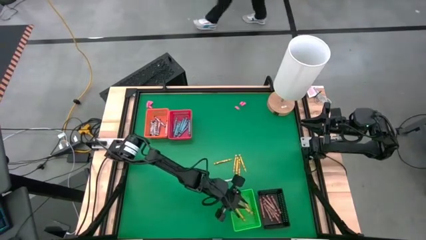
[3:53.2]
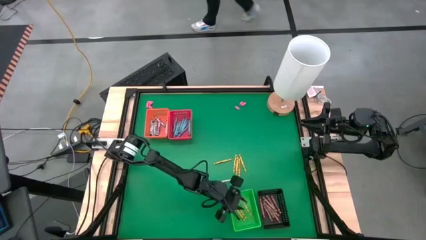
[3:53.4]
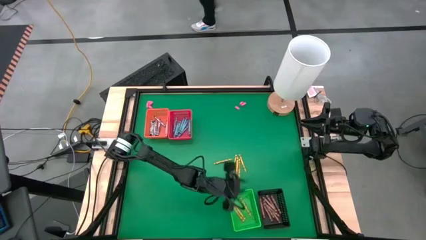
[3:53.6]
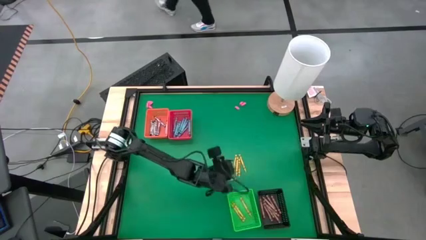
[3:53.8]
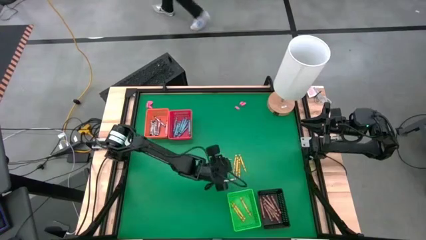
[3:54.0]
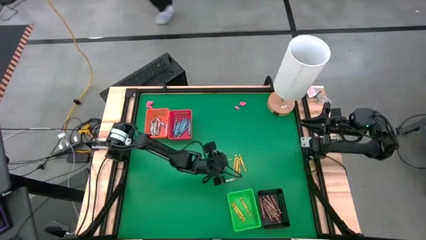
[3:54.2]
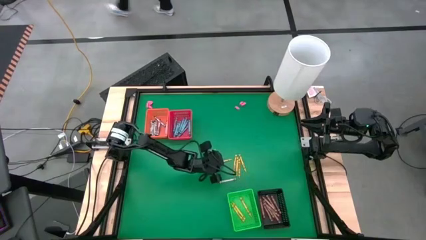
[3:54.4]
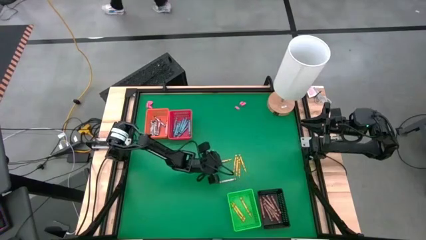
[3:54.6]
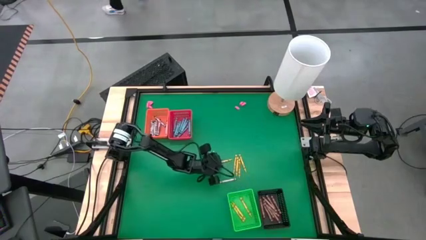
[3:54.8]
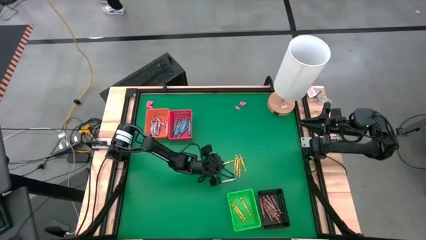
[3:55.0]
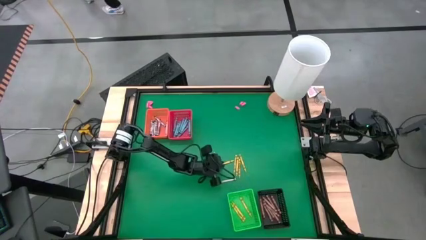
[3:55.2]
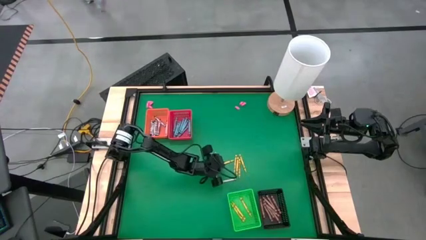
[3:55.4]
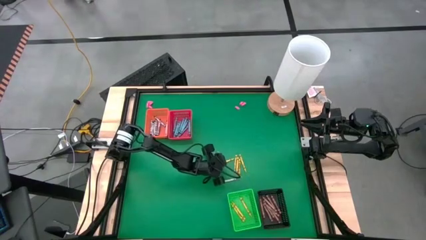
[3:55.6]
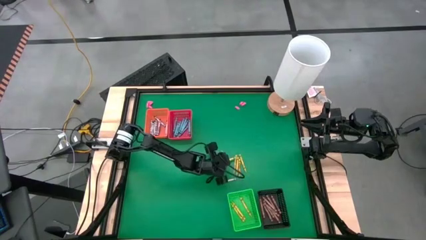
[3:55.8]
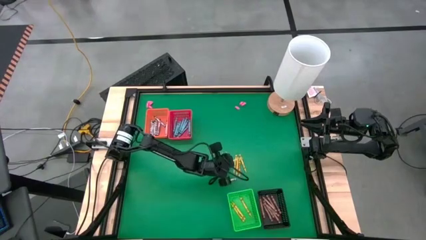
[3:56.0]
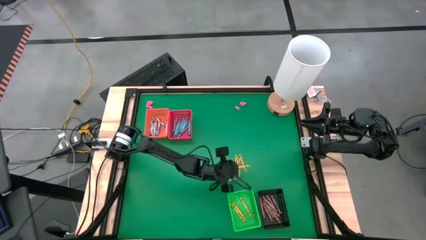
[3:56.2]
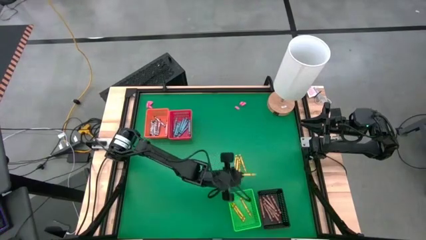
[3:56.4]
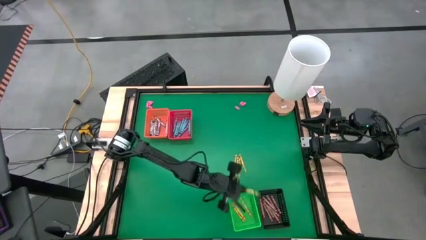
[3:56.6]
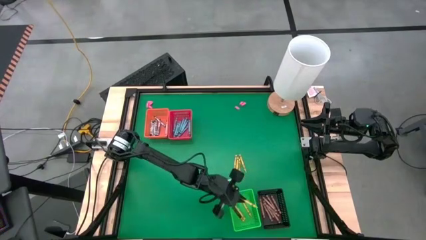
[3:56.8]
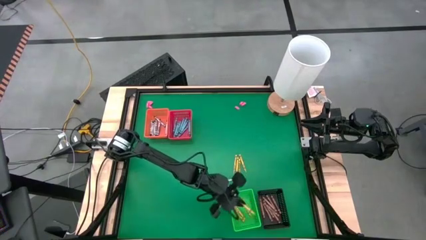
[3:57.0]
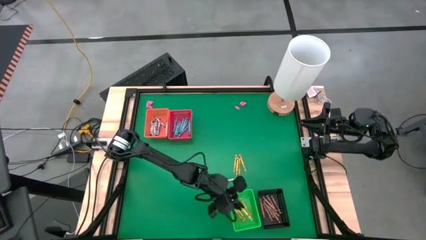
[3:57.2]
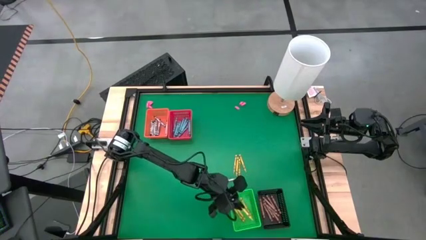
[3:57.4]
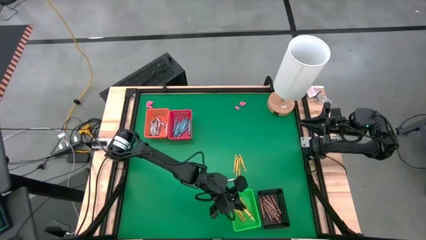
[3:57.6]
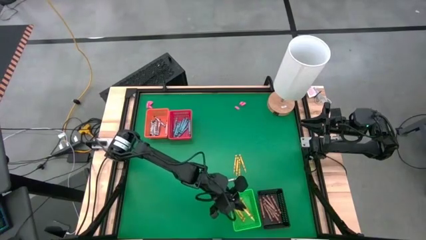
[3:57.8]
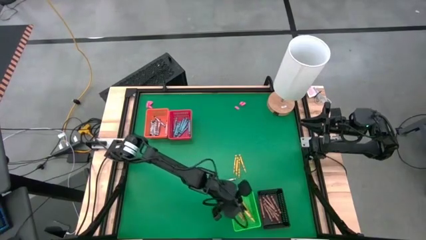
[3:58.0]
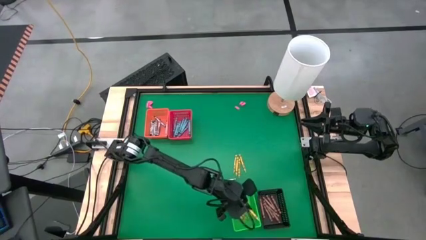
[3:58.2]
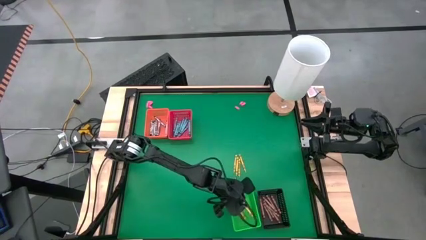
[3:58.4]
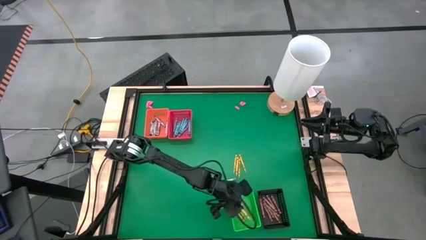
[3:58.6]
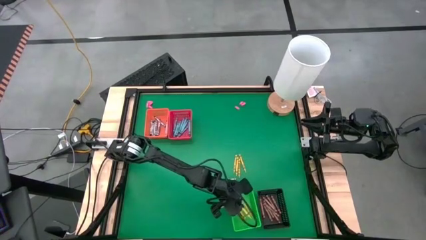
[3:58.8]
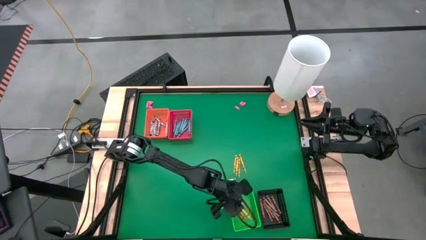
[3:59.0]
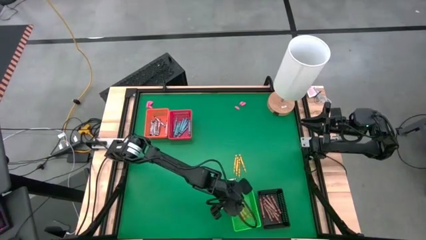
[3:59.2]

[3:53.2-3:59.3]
Task: Sort crayons
Put the yellow crayon into the green bin

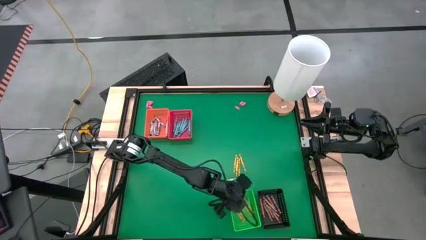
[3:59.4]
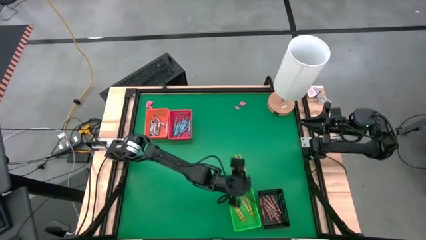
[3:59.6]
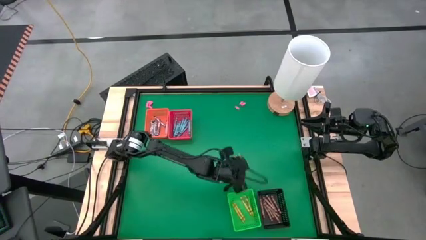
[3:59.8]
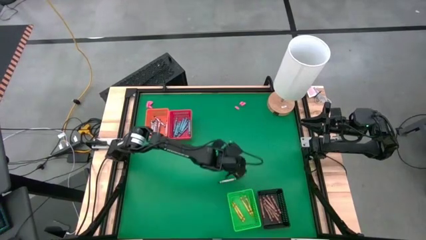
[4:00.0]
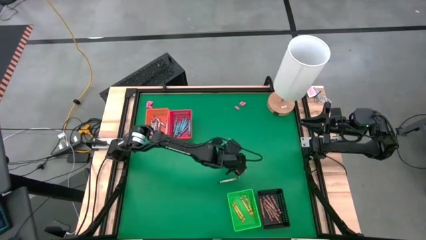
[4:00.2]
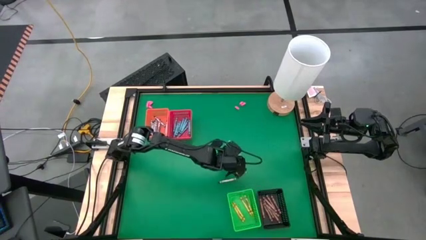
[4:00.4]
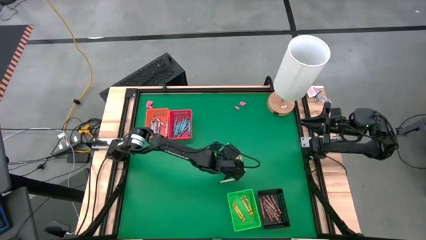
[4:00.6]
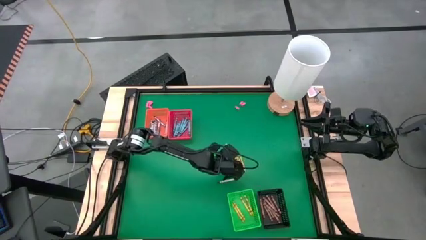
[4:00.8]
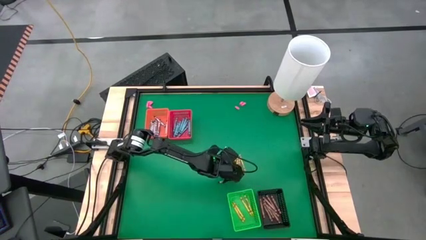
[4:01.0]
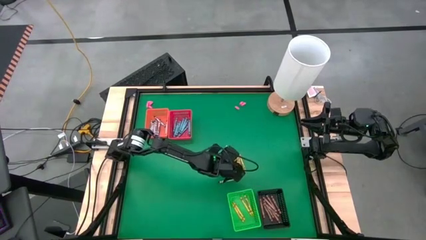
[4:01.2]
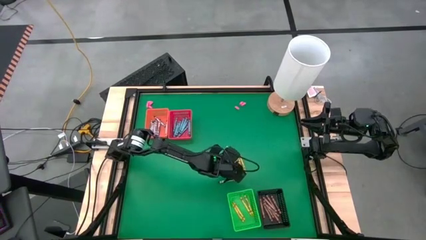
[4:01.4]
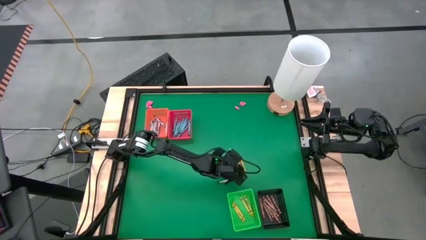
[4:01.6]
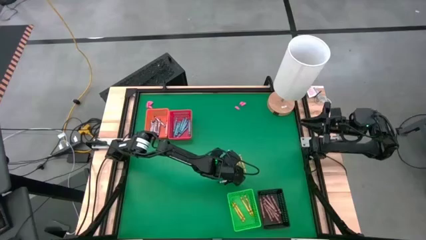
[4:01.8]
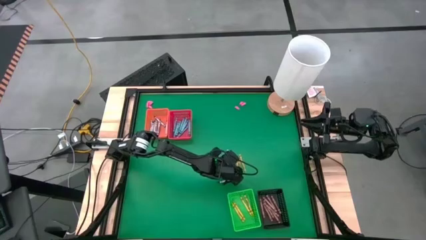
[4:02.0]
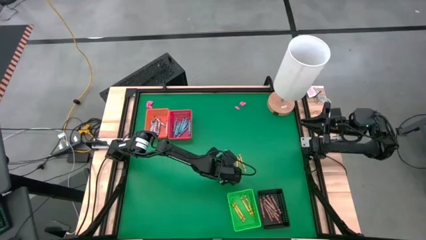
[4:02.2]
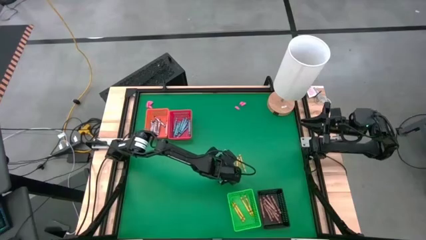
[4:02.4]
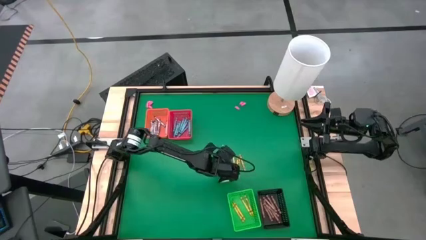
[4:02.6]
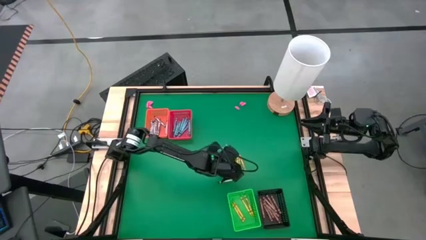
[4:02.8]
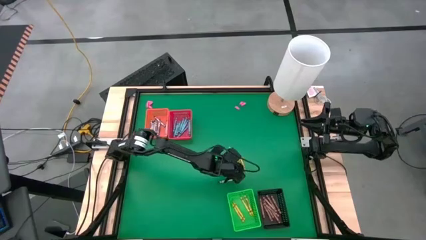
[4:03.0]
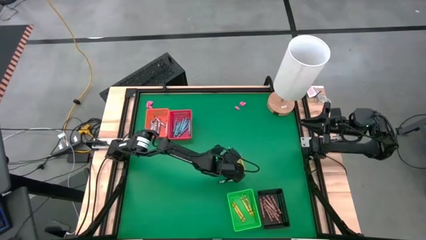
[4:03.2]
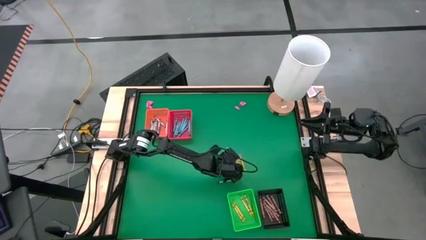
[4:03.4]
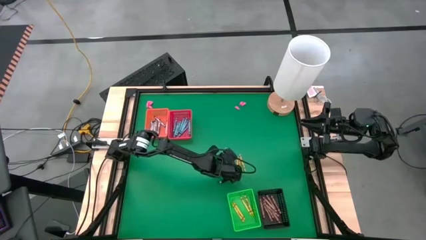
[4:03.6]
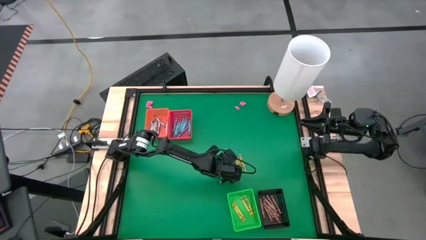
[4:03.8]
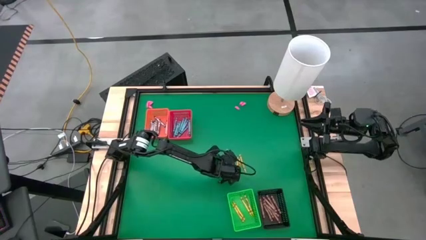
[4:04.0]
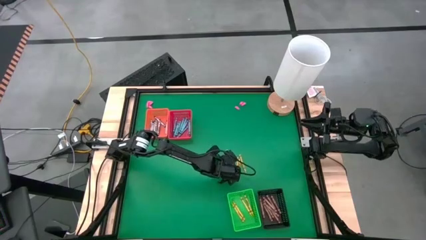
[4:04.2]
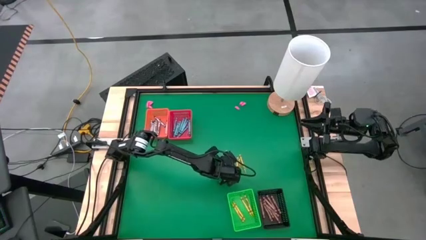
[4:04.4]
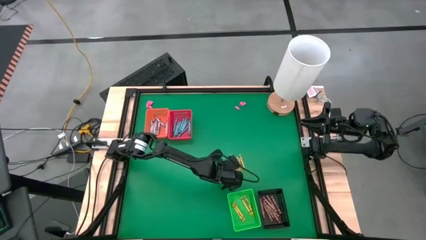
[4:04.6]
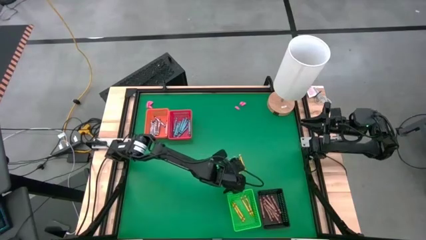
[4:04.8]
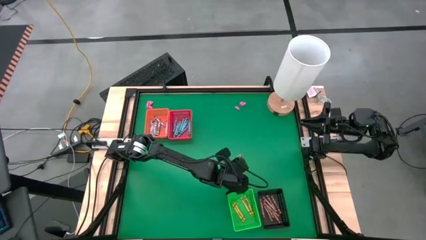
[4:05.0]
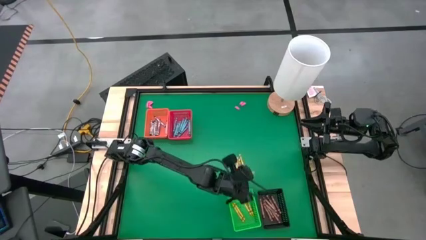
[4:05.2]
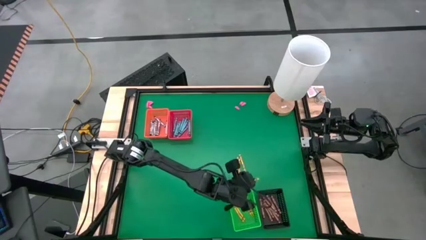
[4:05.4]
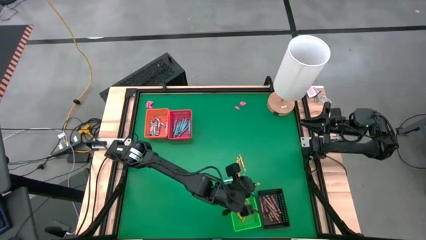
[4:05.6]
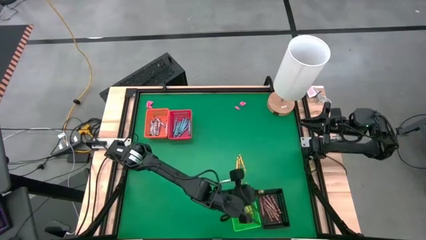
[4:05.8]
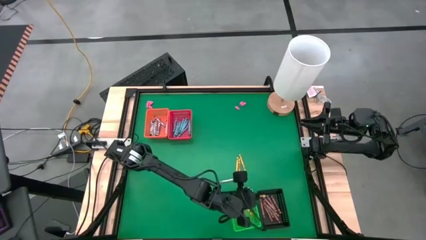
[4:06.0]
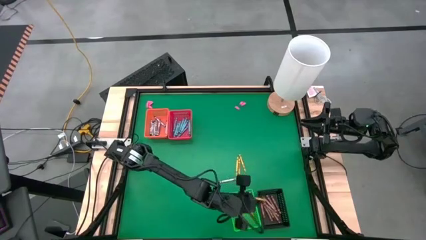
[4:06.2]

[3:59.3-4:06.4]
Put the yellow crayon into the green bin

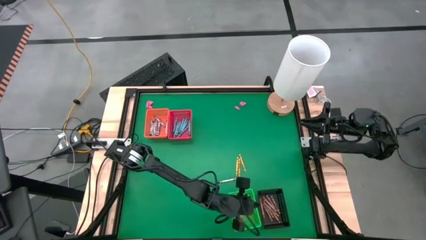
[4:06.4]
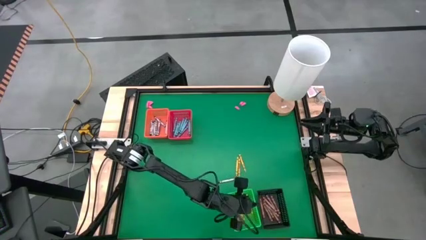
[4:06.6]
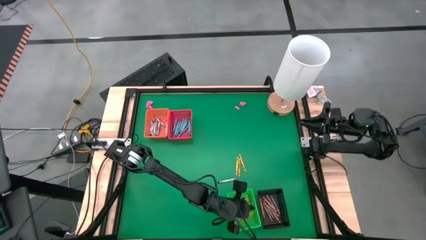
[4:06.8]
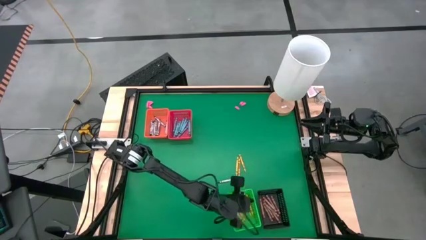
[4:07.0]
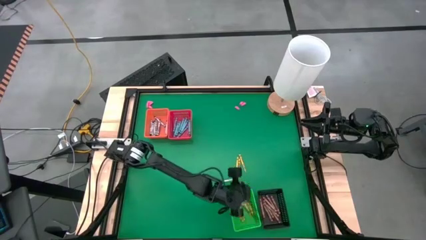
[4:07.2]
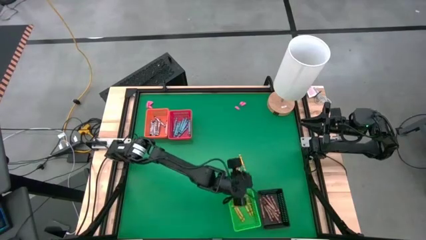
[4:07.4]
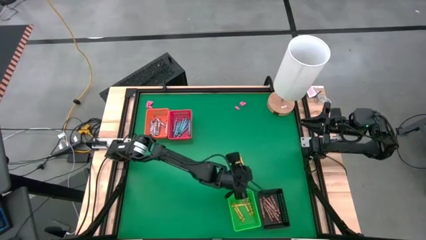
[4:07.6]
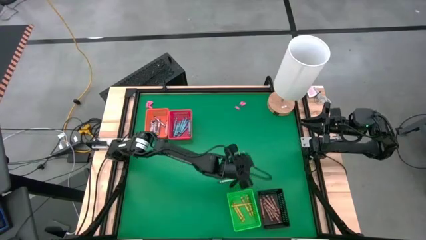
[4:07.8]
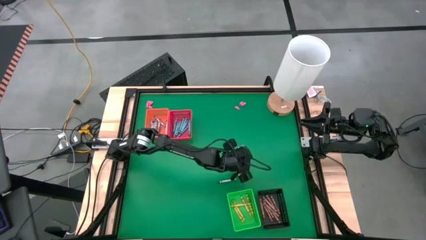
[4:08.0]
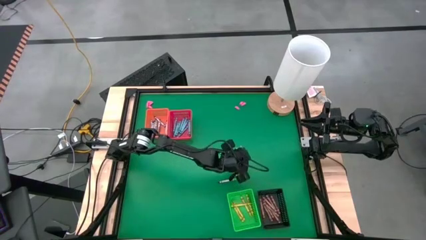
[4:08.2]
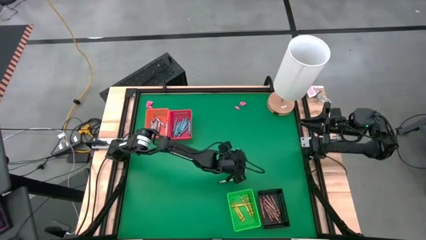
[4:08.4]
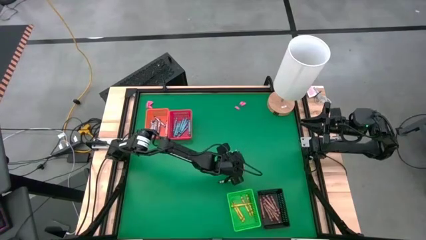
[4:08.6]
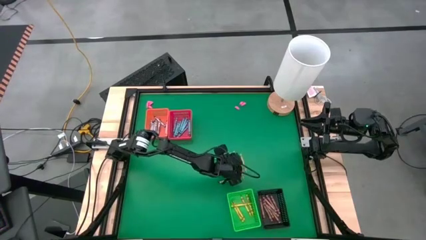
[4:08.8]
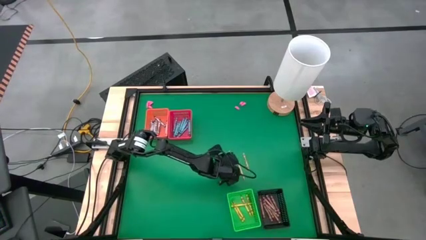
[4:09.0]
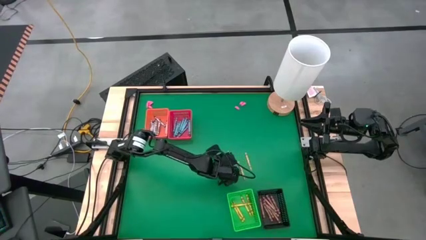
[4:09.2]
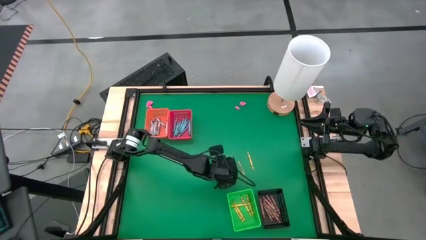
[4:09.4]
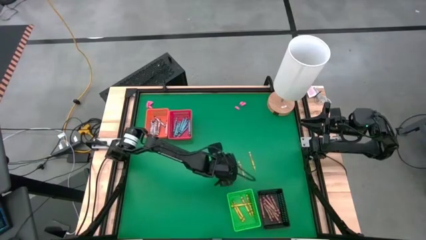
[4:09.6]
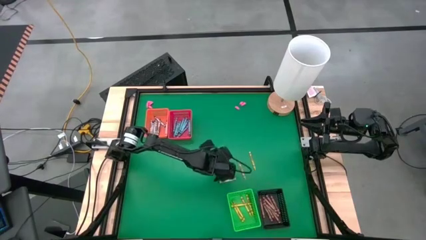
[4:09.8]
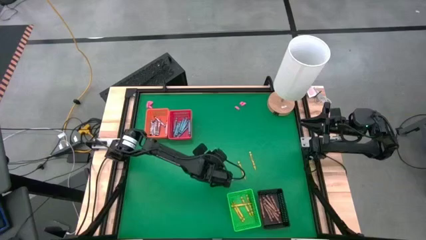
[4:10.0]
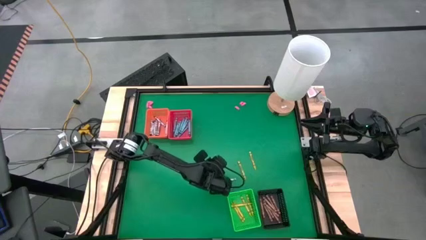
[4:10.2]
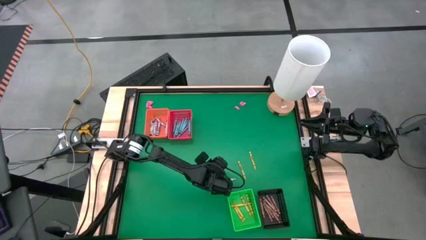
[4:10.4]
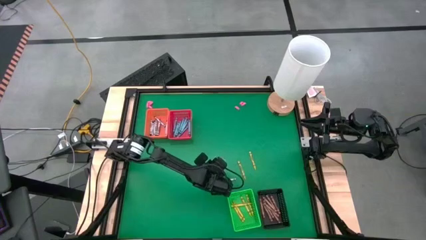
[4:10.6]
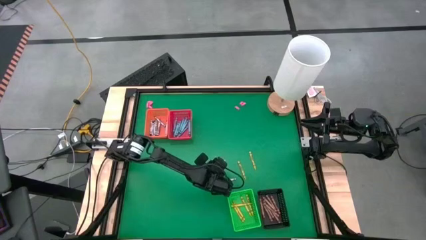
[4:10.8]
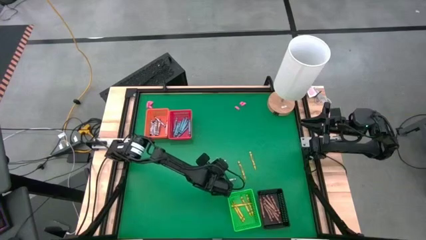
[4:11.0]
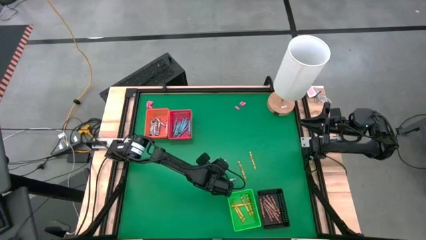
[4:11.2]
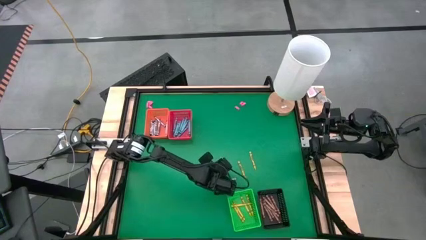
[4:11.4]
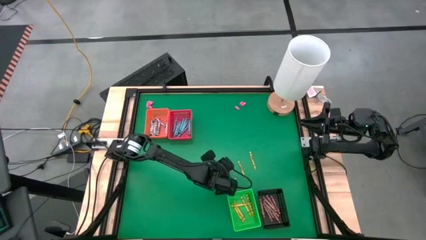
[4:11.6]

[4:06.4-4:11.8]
Put the yellow crayon into the green bin
